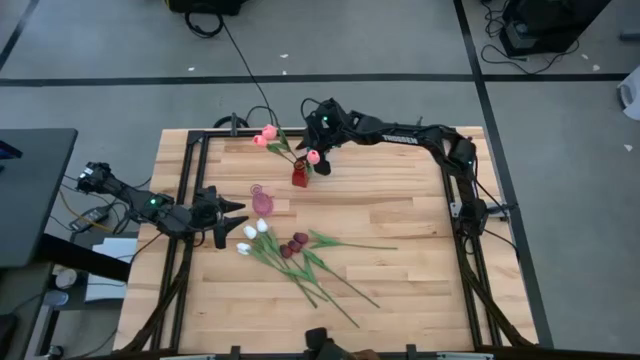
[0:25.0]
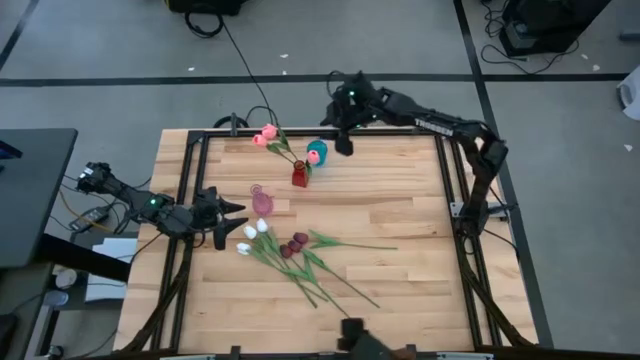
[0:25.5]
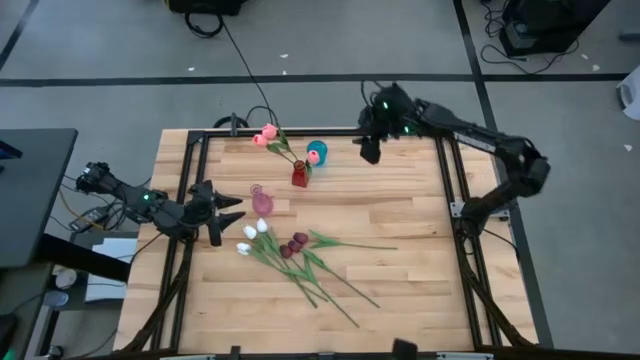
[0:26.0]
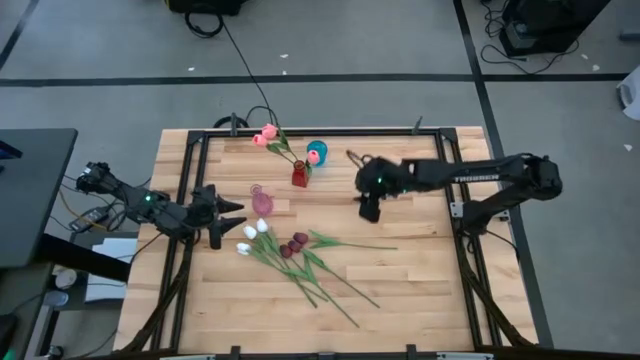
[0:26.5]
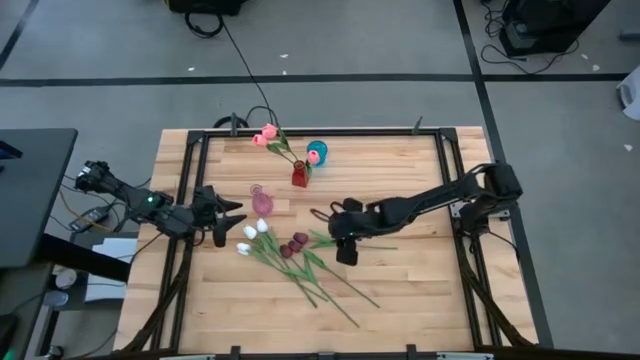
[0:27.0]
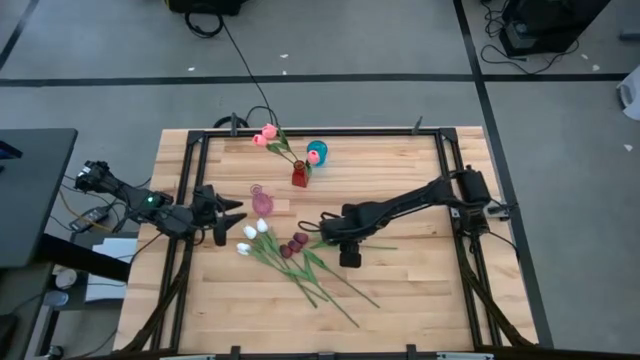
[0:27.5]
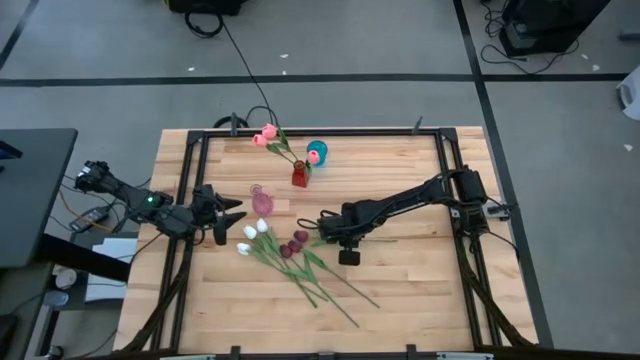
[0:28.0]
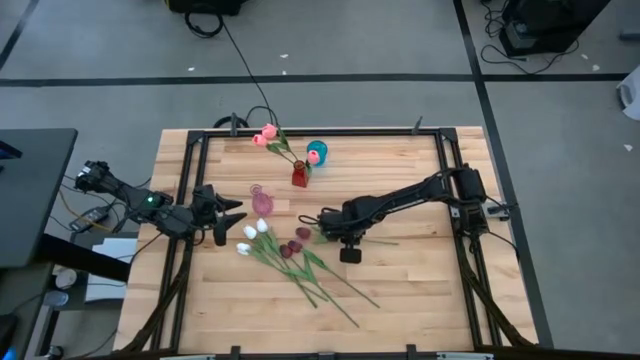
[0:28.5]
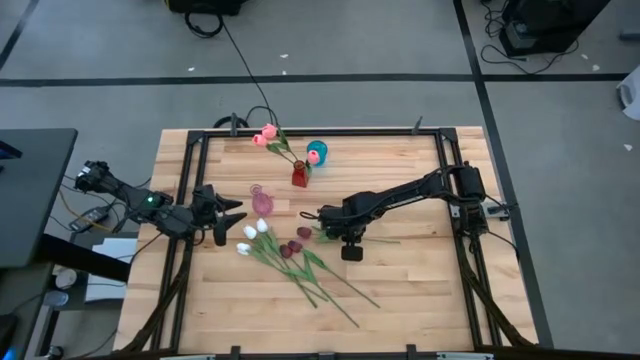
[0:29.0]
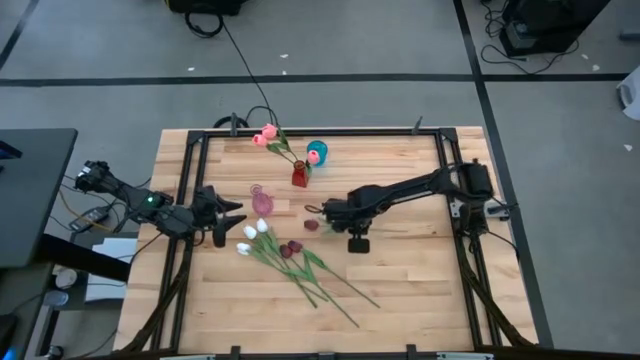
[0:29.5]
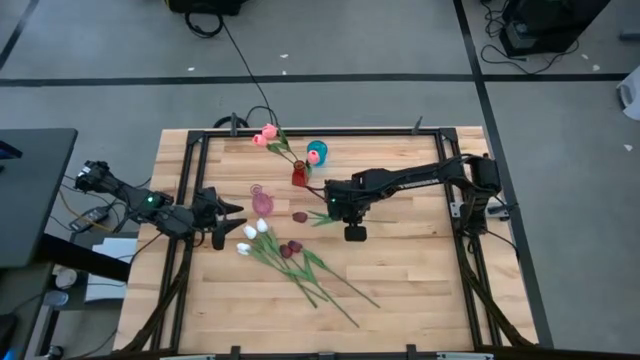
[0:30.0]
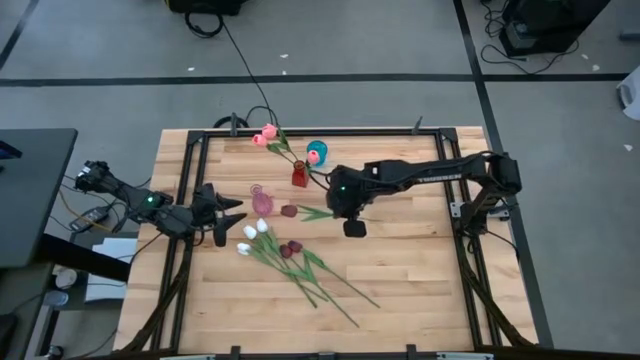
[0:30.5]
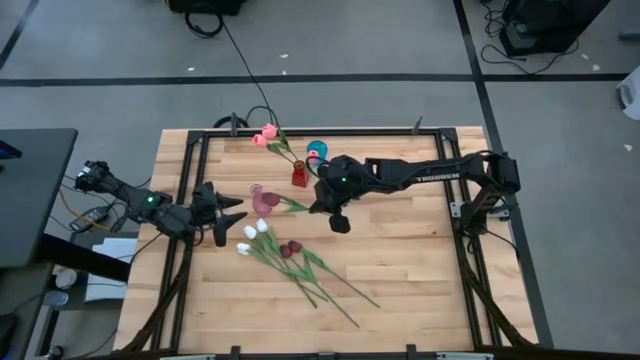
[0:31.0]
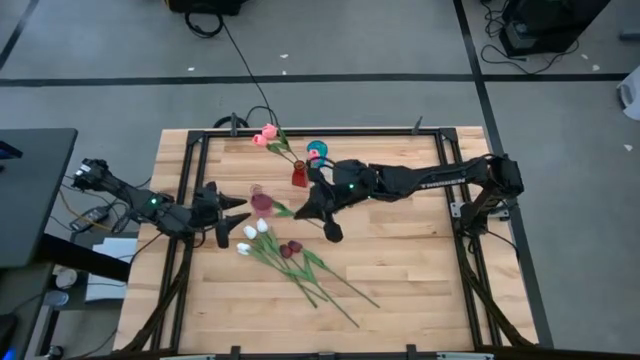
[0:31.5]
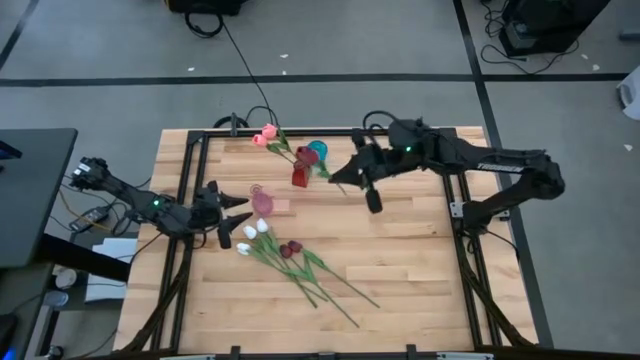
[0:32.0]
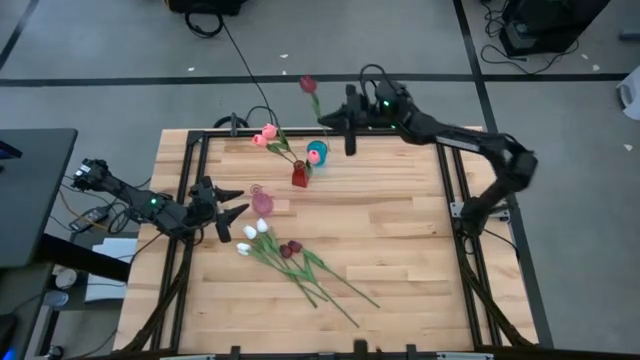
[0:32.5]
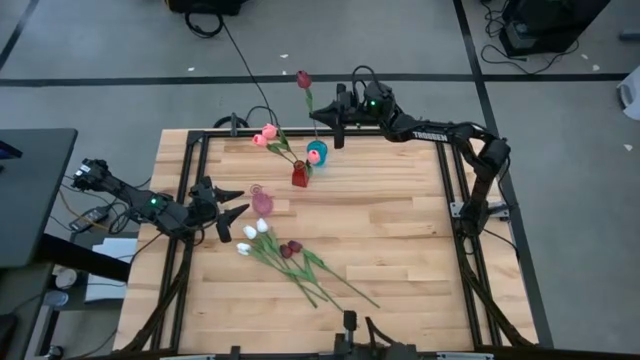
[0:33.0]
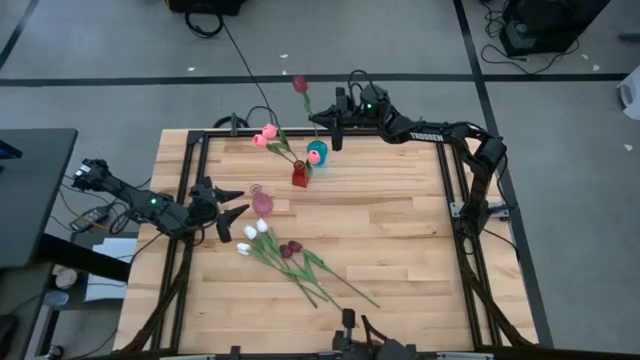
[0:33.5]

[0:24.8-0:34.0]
Task: Sort flowers into vase by color
Put the dark red tulip into the blue vase

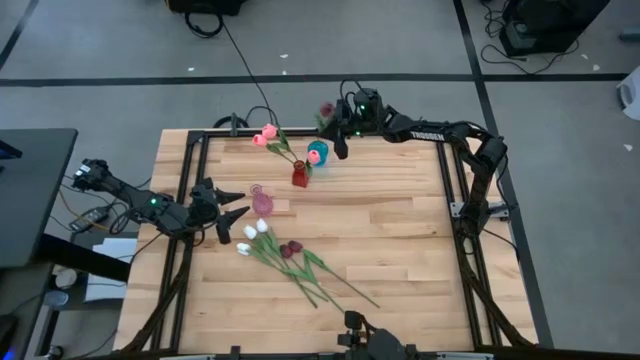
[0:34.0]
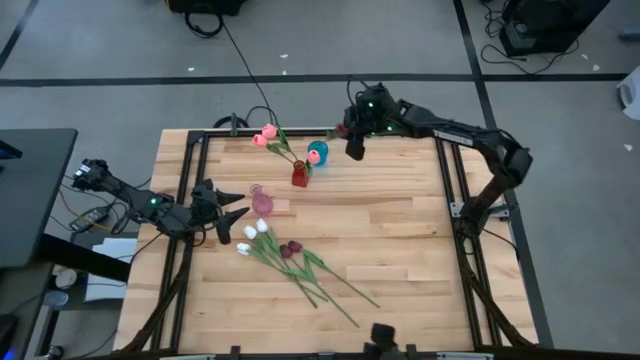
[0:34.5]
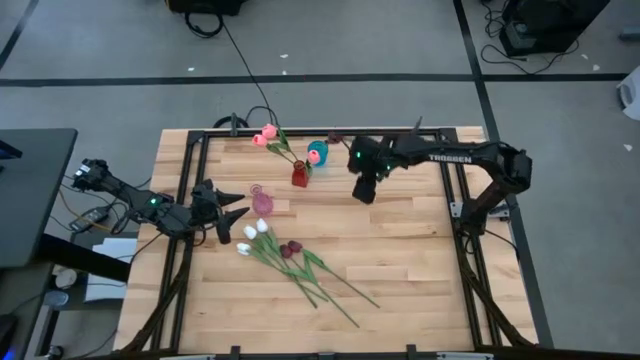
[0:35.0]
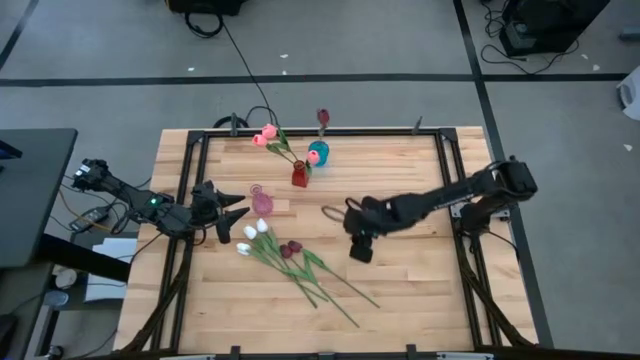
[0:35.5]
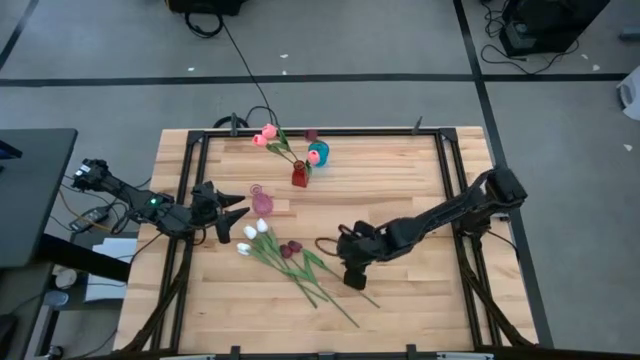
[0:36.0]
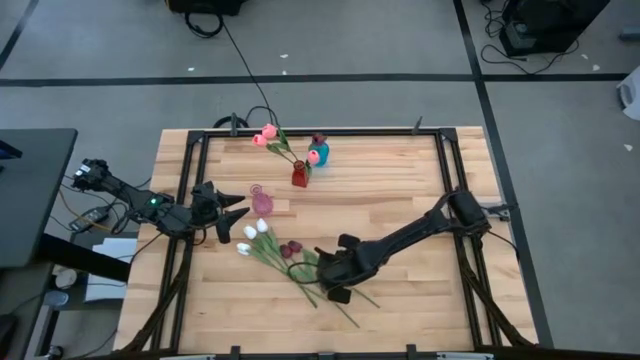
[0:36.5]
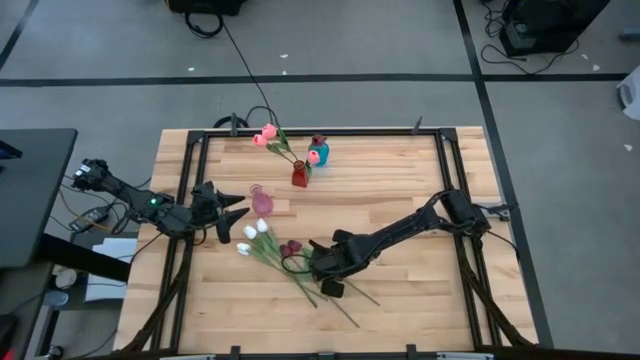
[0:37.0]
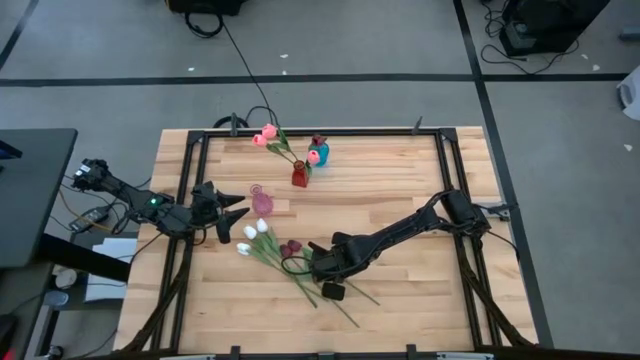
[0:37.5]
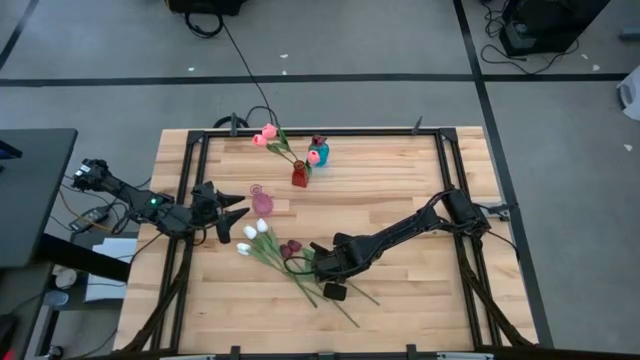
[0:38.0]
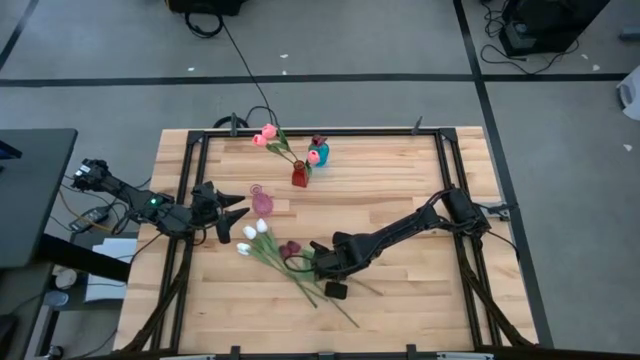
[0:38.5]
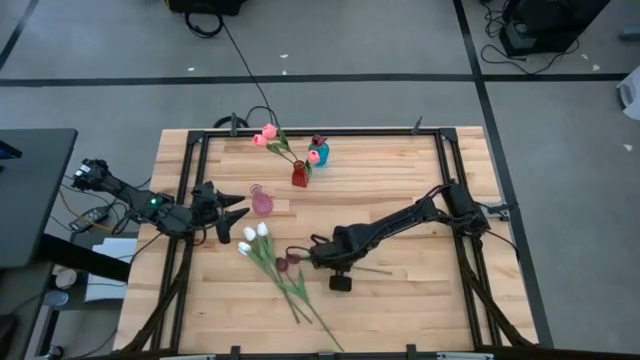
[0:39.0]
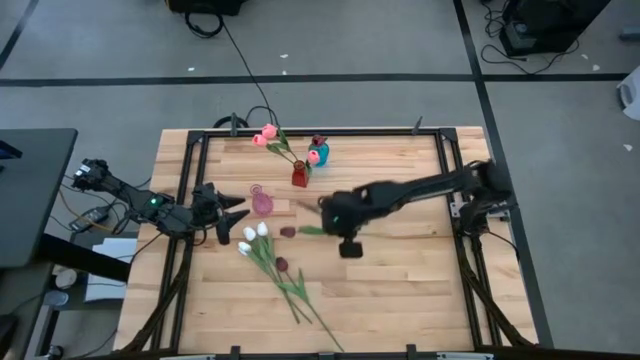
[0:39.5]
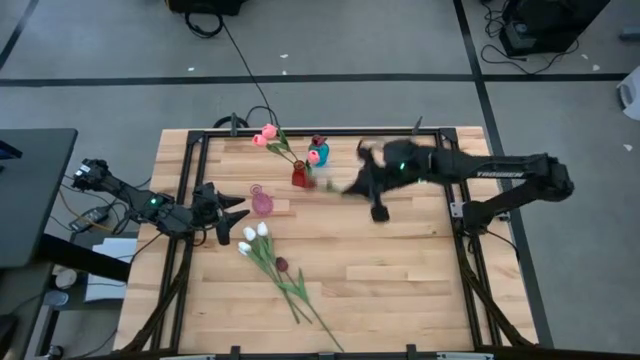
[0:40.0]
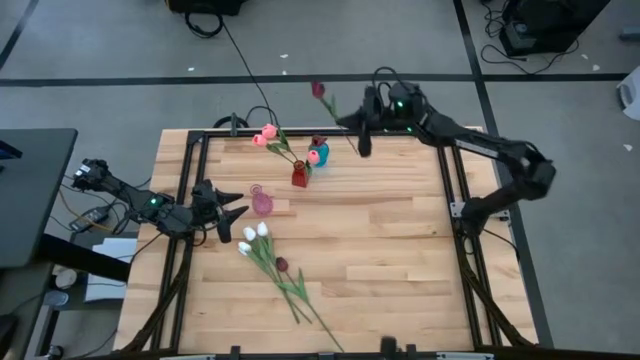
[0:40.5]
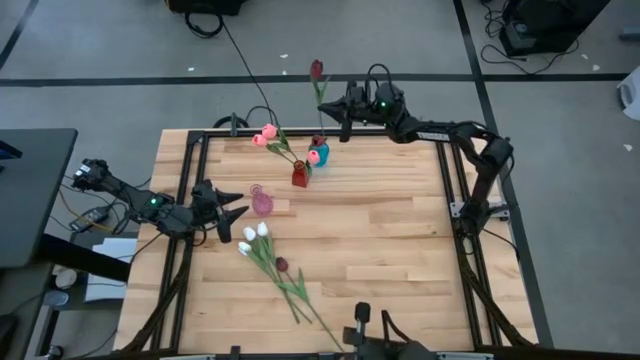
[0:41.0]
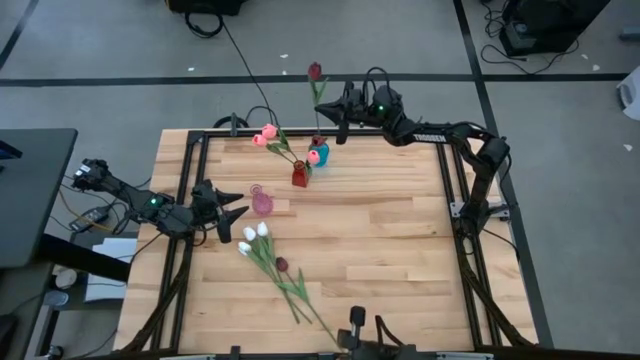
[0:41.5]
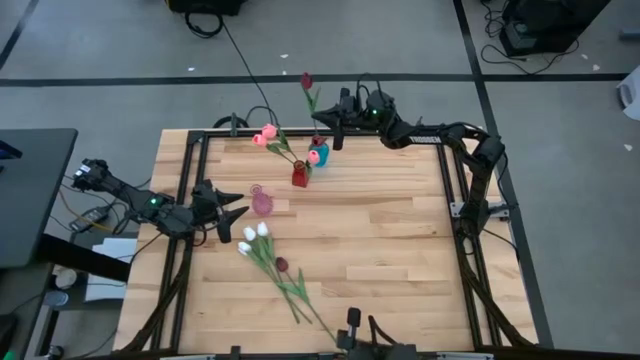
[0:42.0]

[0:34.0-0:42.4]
Put the dark red tulip into the blue vase

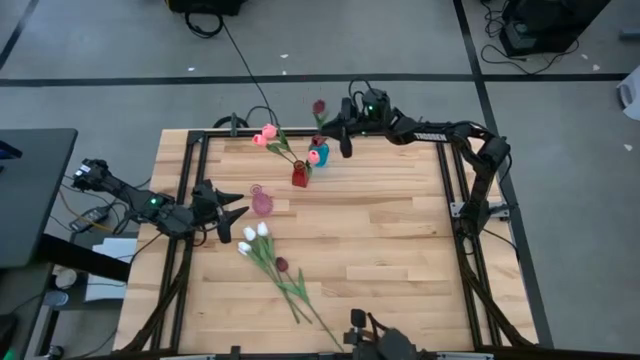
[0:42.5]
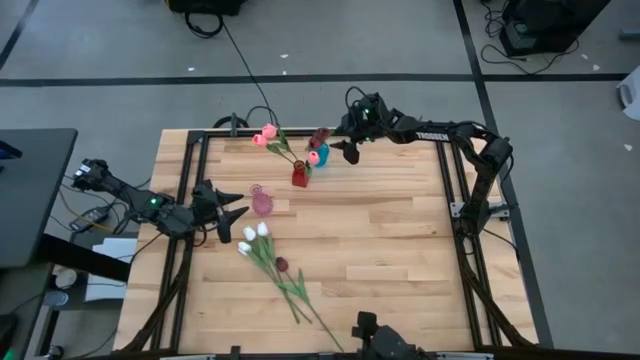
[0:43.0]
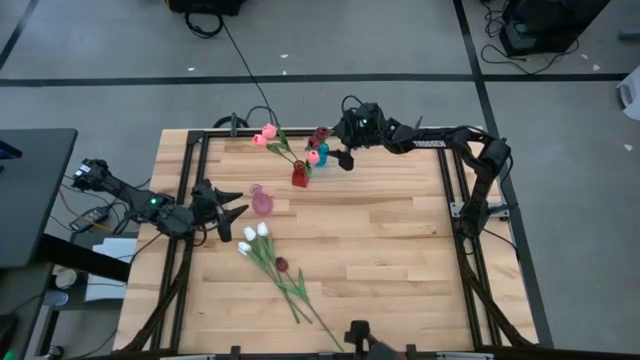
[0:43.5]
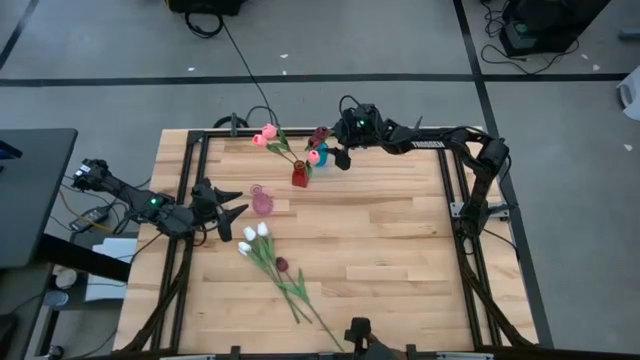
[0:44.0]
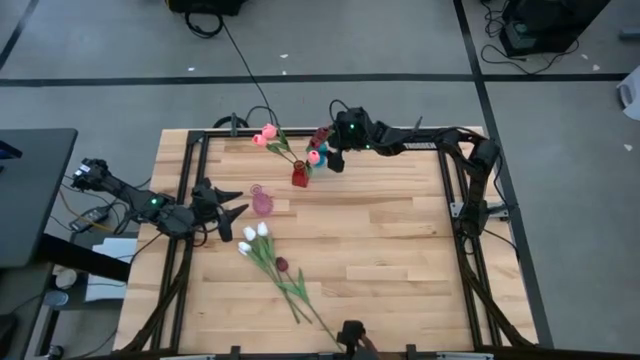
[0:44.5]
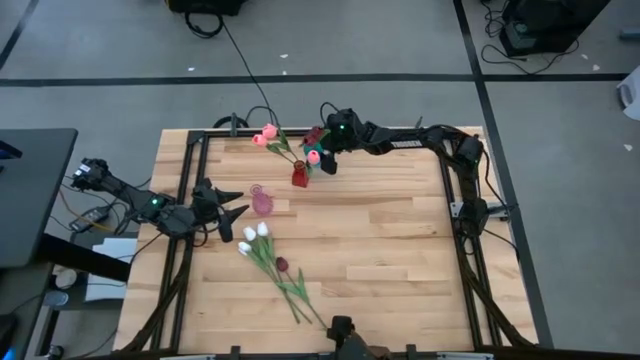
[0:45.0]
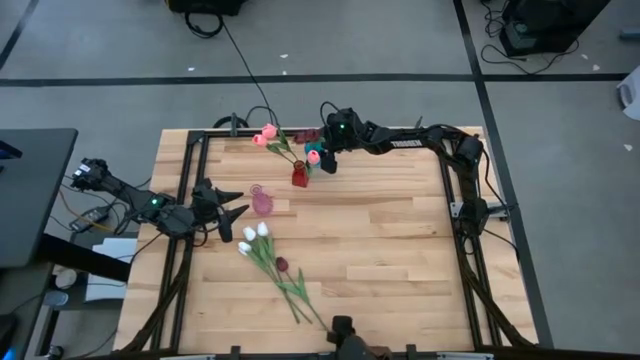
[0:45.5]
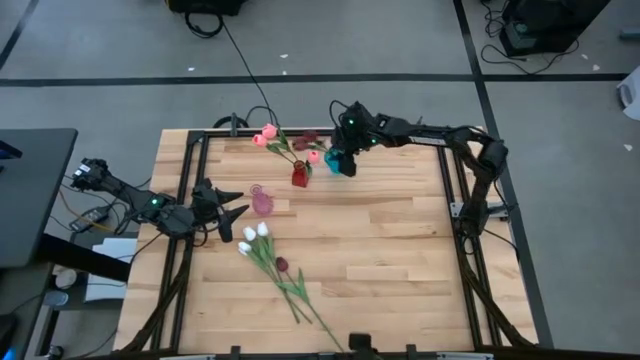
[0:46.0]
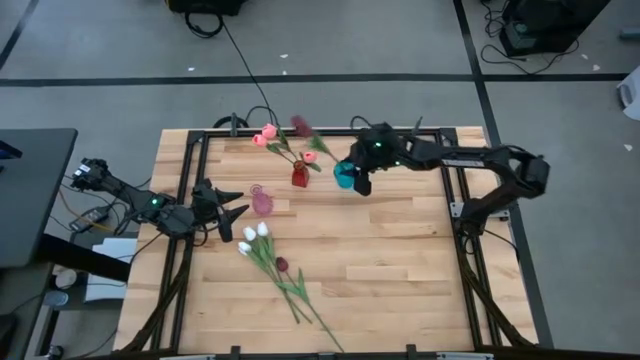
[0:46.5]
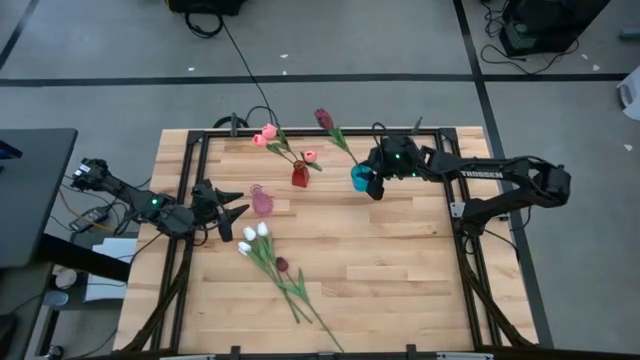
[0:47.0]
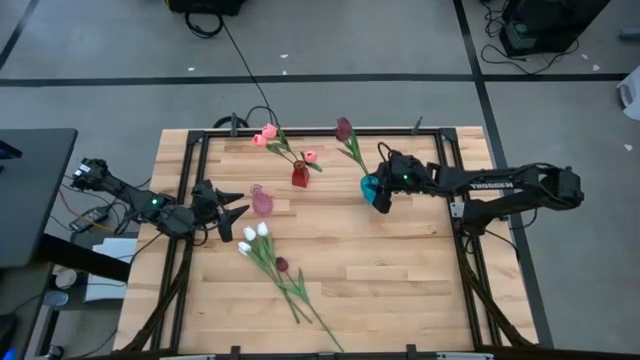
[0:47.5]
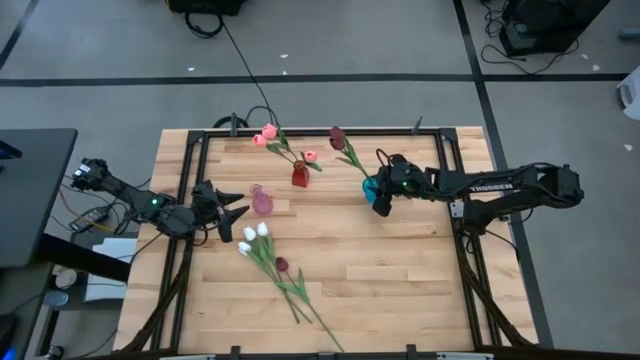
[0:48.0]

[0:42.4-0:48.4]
Adjust the blue vase
